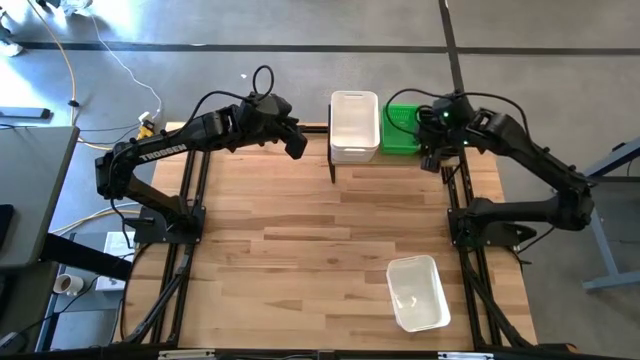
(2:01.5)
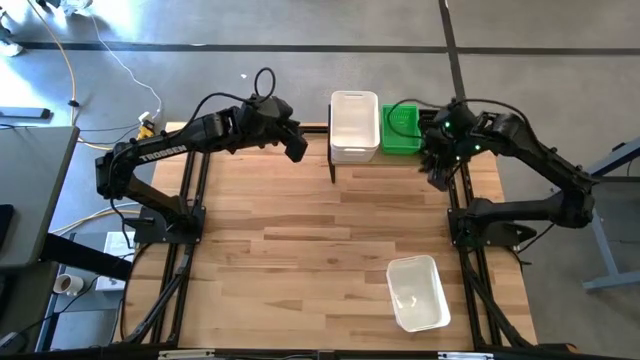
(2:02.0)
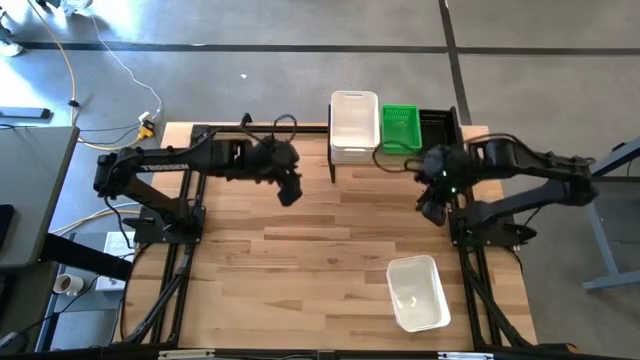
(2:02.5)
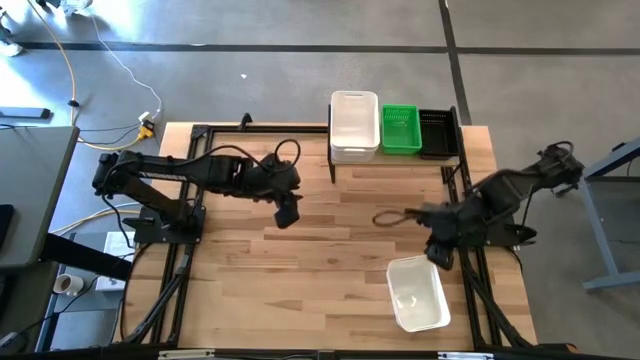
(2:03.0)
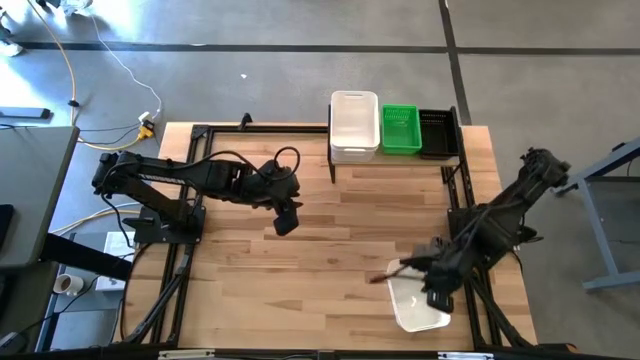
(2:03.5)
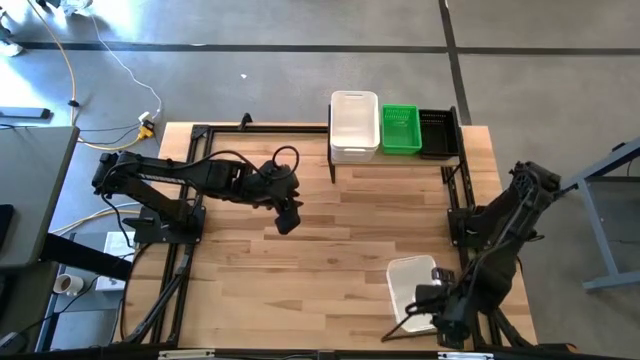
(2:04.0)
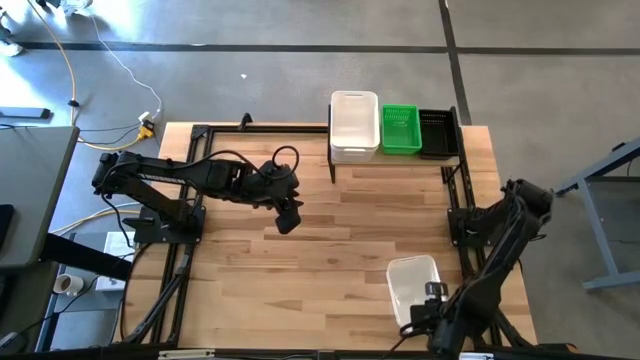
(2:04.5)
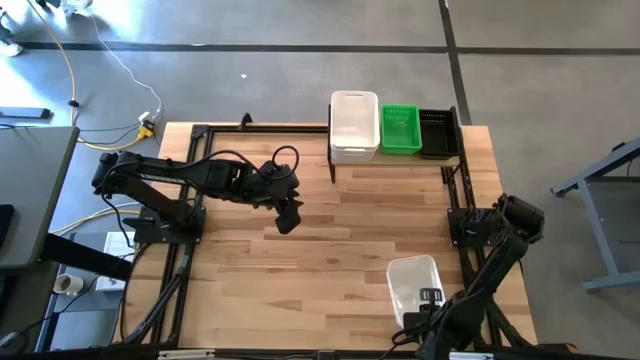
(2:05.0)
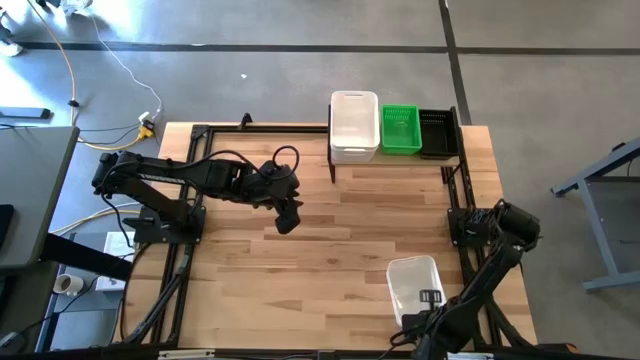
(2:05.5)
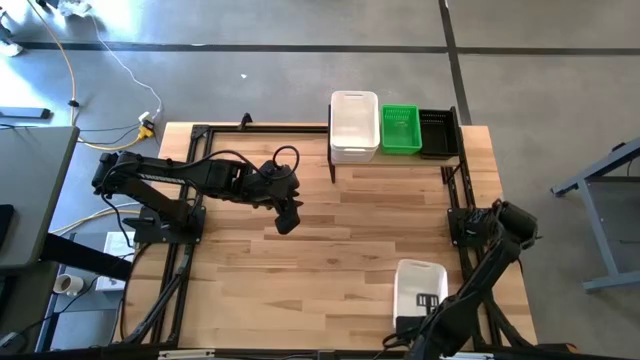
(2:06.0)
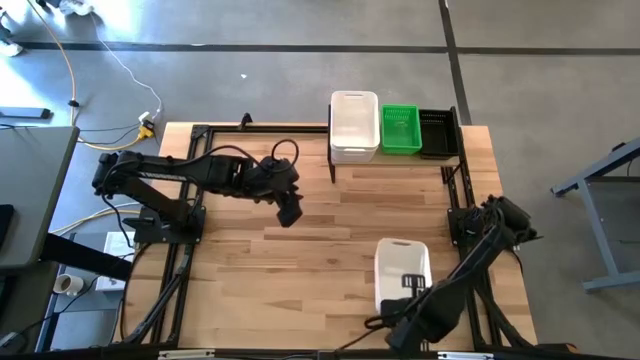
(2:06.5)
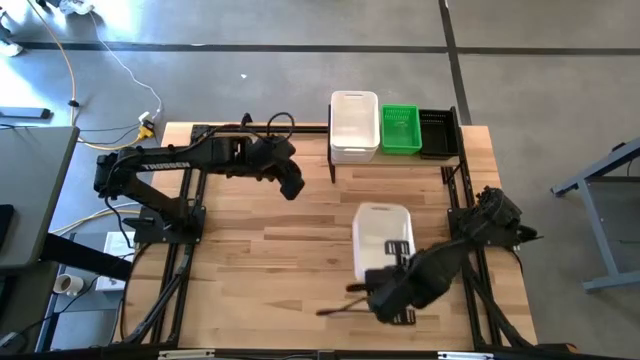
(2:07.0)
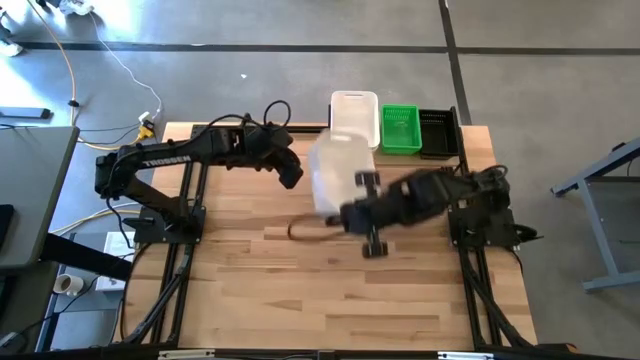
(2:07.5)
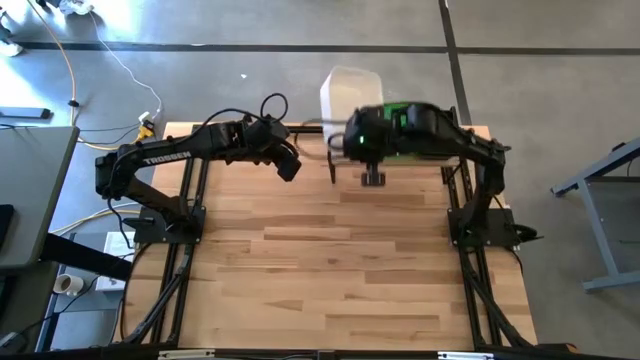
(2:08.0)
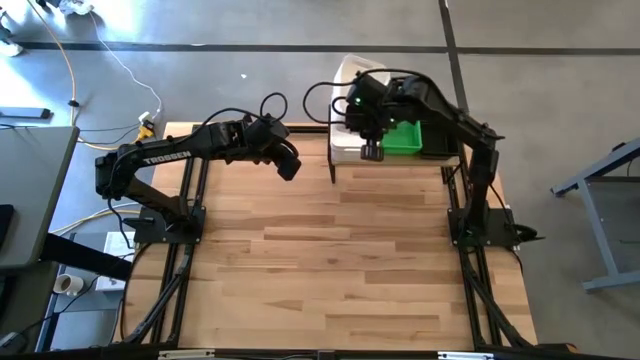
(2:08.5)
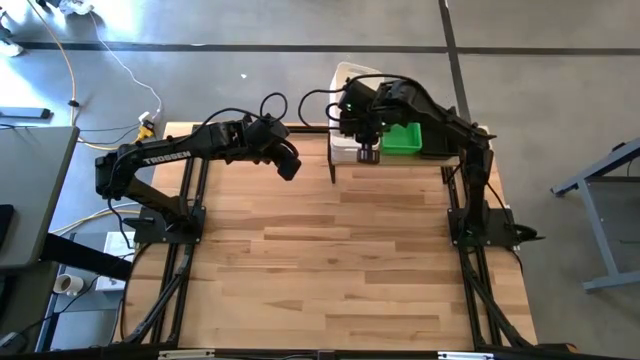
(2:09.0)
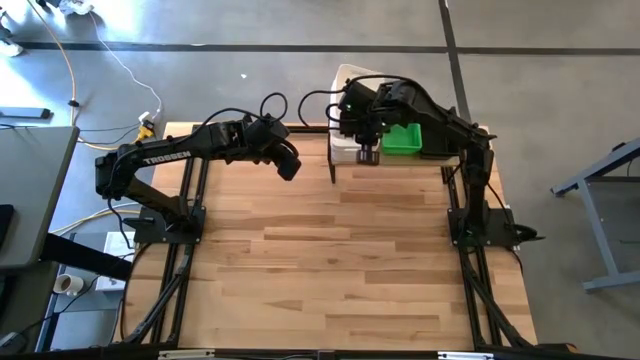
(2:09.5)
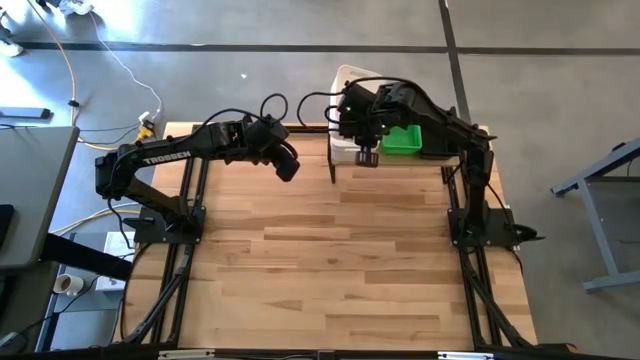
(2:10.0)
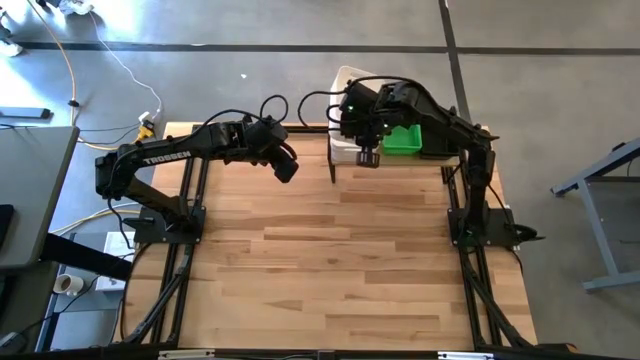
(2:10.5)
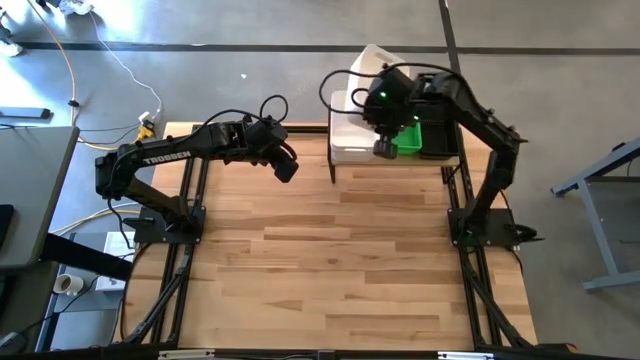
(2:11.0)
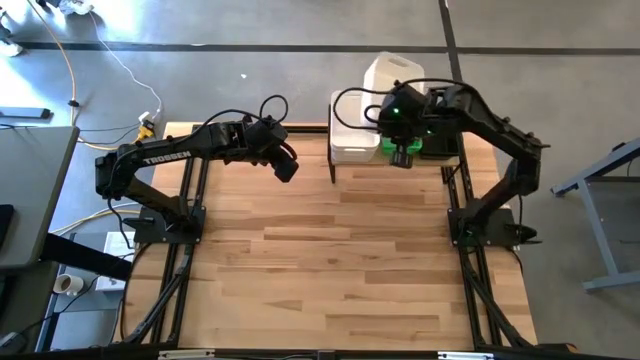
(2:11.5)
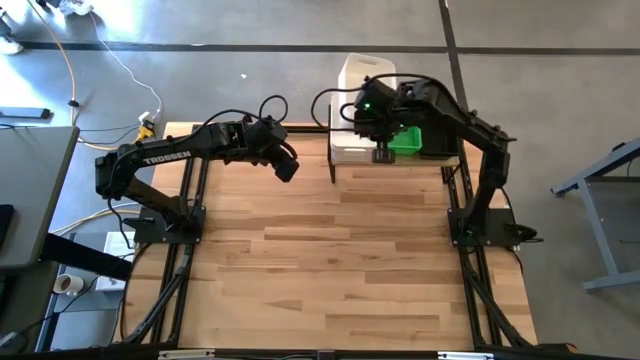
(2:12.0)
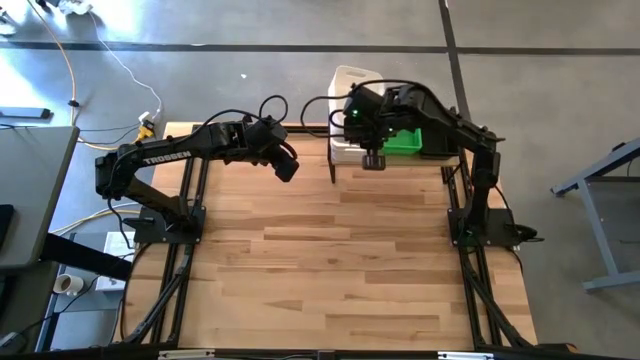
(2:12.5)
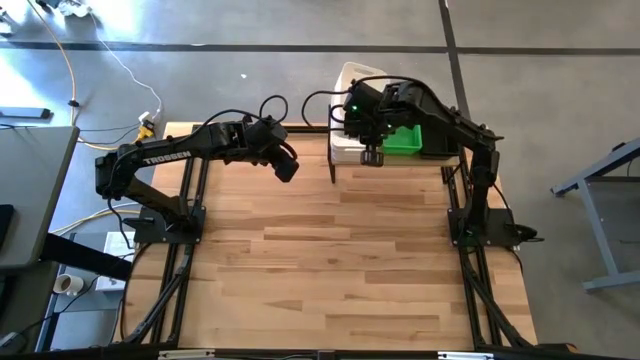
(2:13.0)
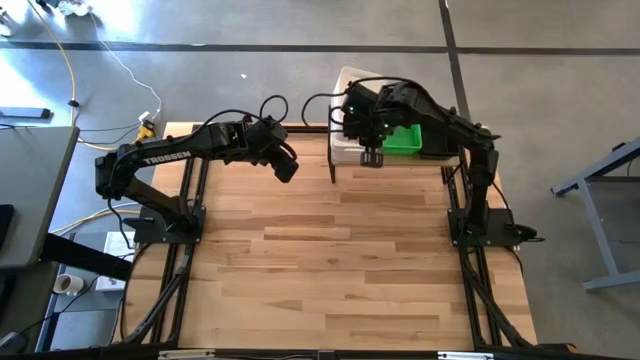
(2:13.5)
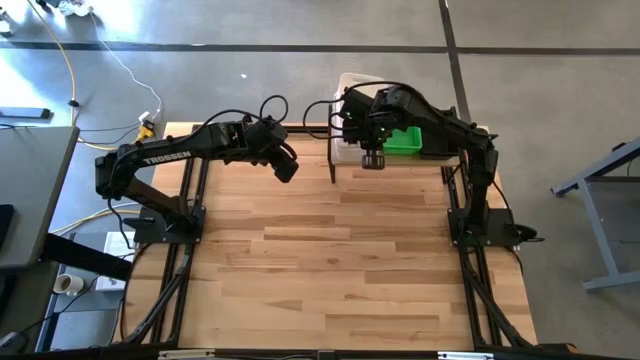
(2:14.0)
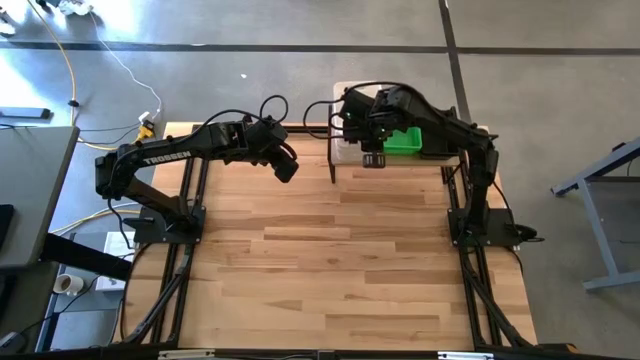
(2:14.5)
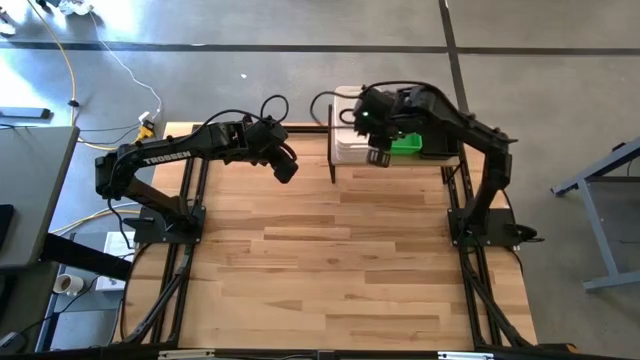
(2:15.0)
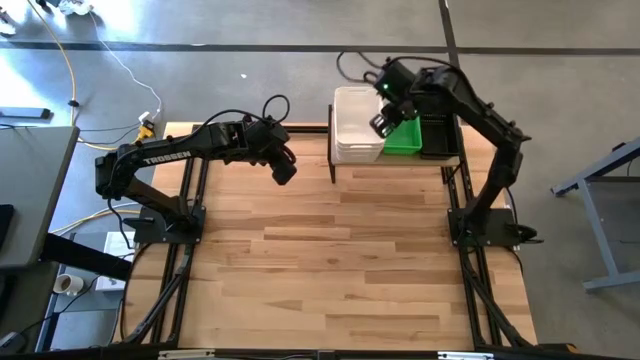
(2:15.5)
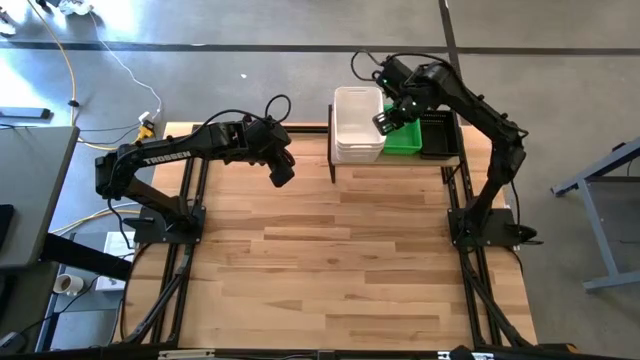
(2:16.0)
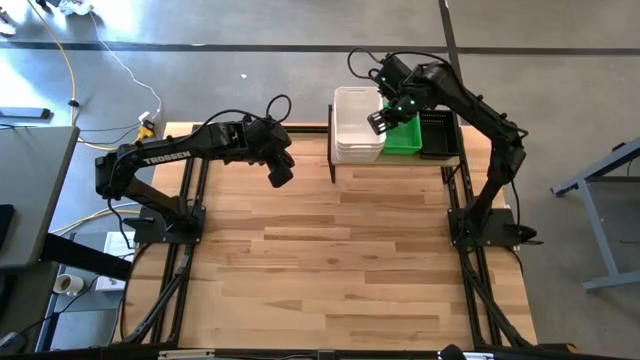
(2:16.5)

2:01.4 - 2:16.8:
Task: Stack baskets on shelf by color
Stack the white bin on top of the white bin

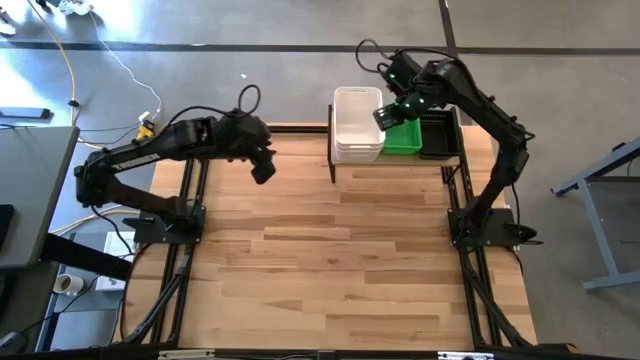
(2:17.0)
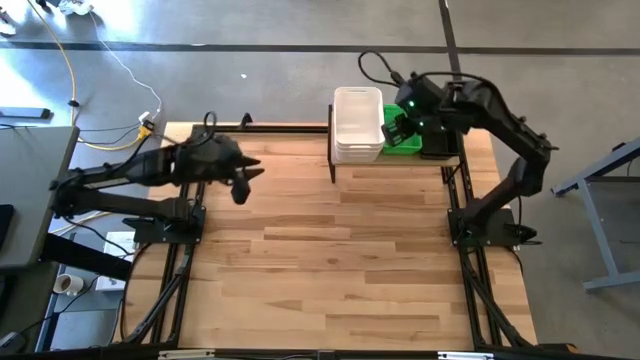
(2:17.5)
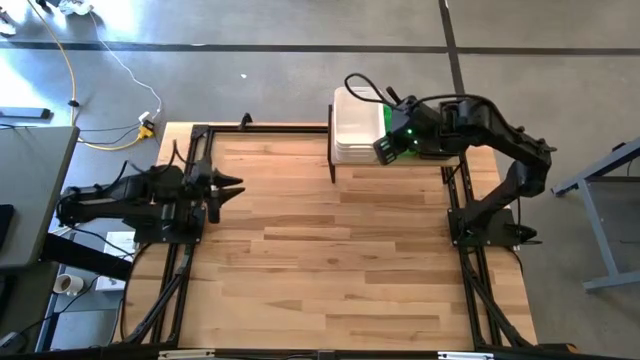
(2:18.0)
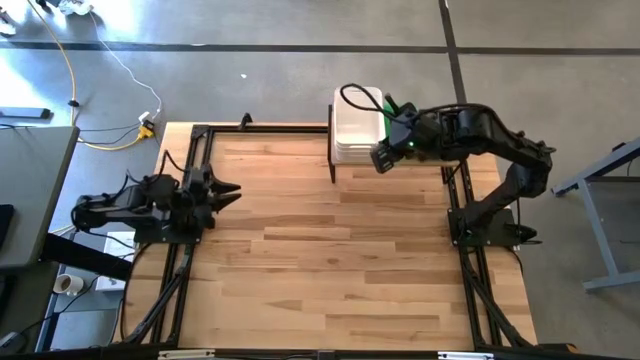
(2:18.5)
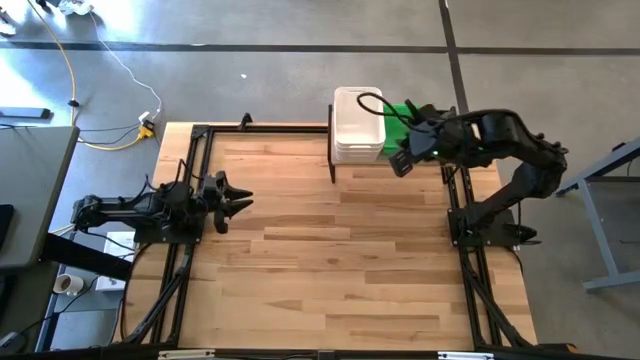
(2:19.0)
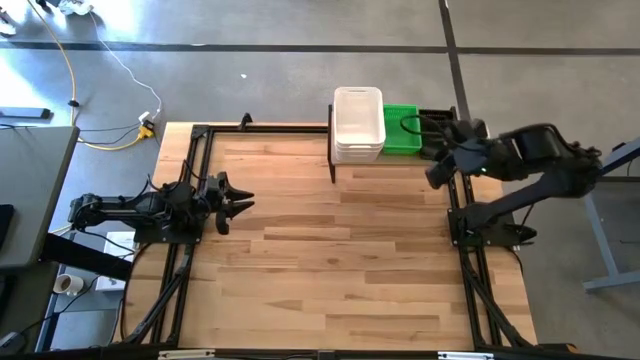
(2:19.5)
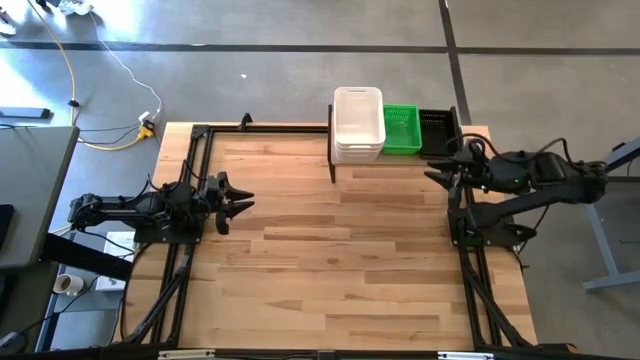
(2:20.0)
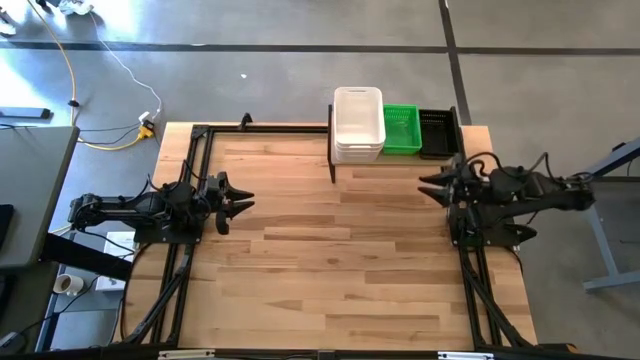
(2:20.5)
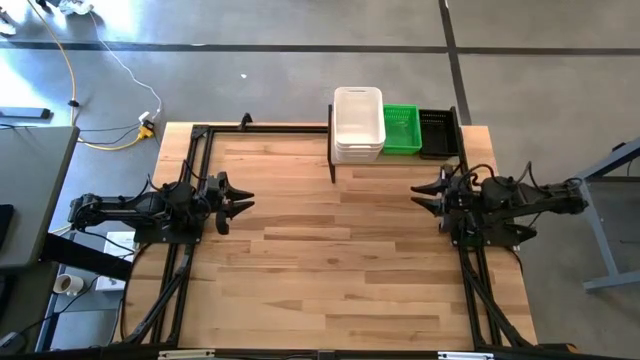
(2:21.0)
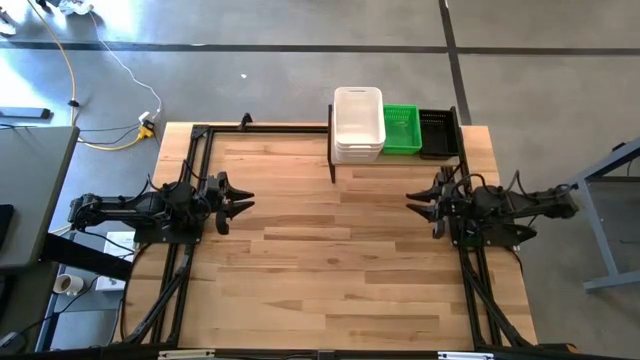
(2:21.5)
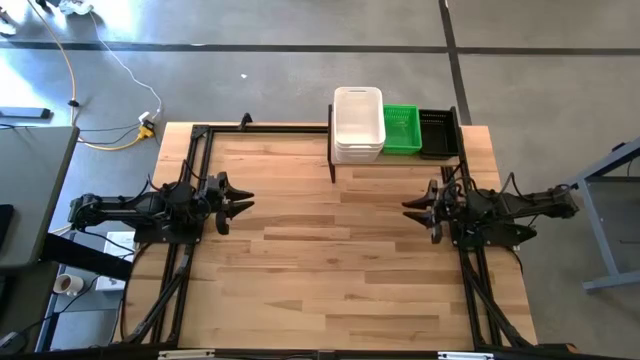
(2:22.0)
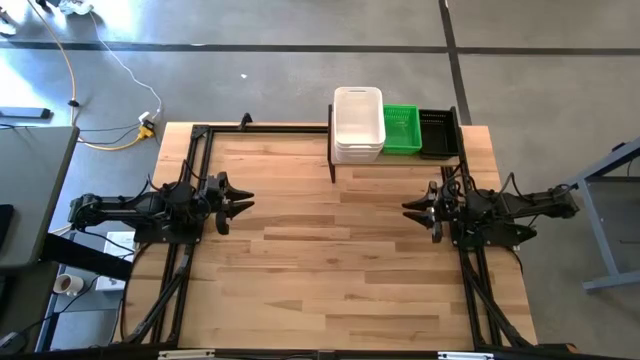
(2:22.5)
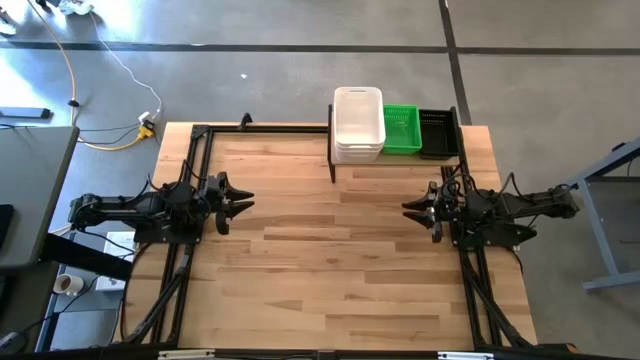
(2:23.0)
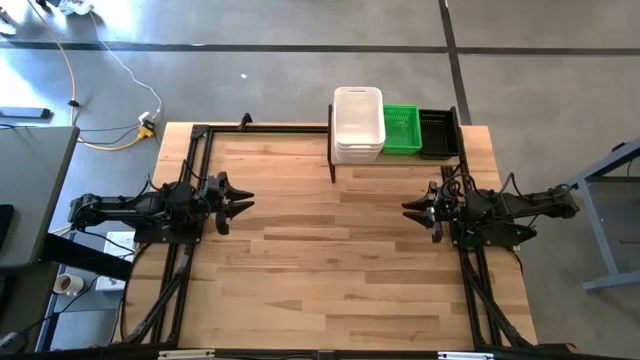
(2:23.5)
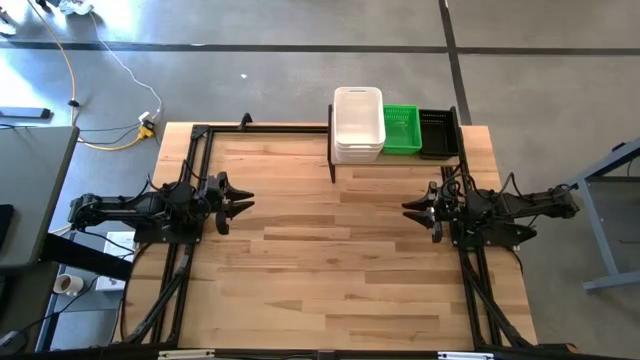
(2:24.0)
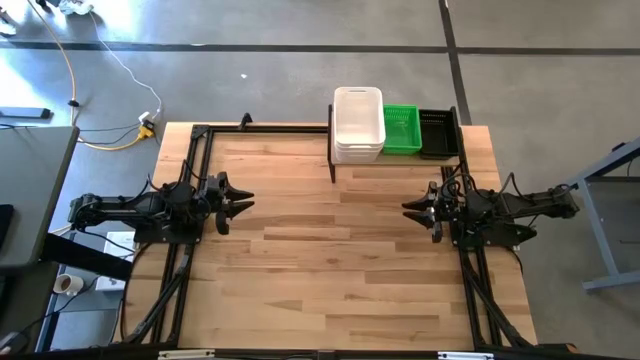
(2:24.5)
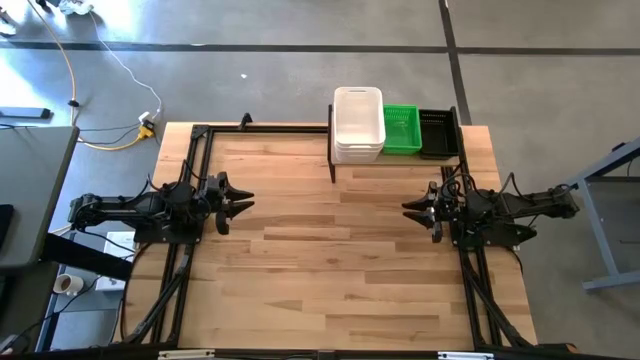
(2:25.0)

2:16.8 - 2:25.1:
Return to Home Position
